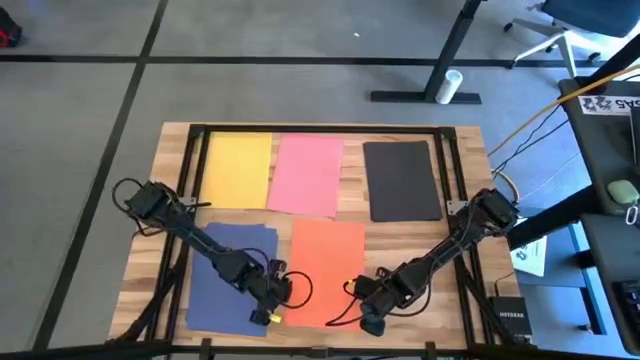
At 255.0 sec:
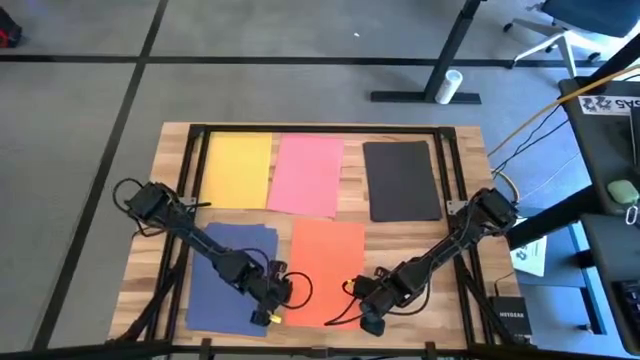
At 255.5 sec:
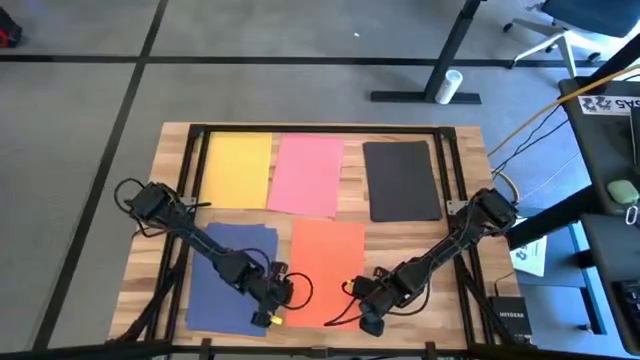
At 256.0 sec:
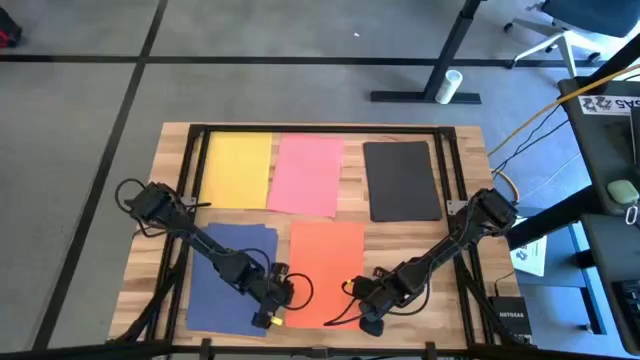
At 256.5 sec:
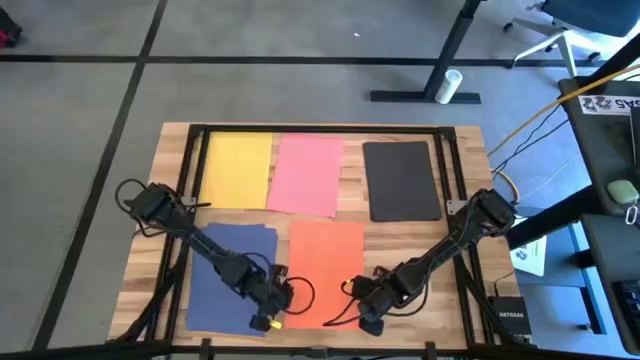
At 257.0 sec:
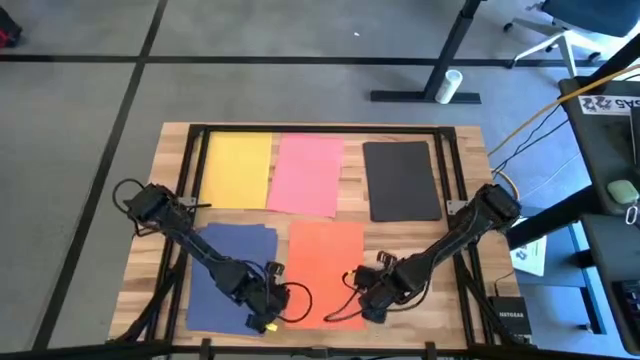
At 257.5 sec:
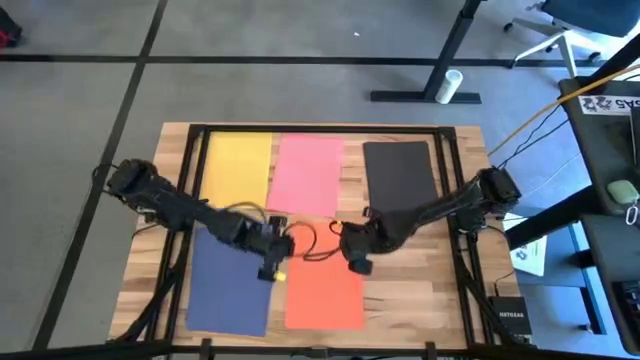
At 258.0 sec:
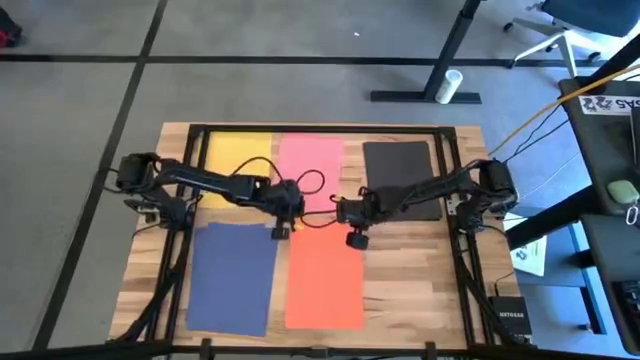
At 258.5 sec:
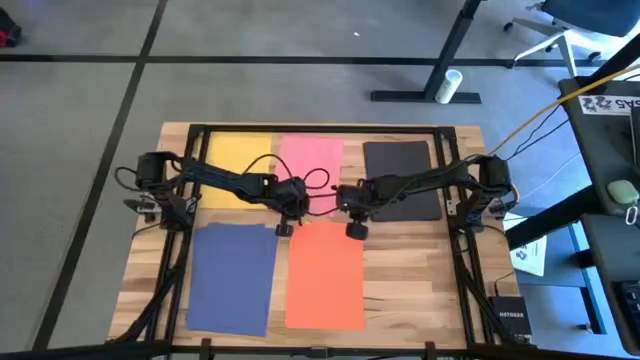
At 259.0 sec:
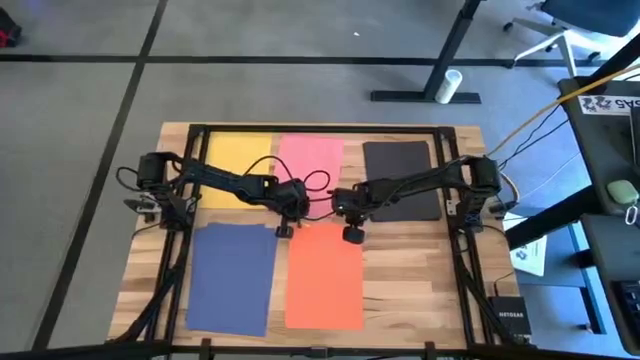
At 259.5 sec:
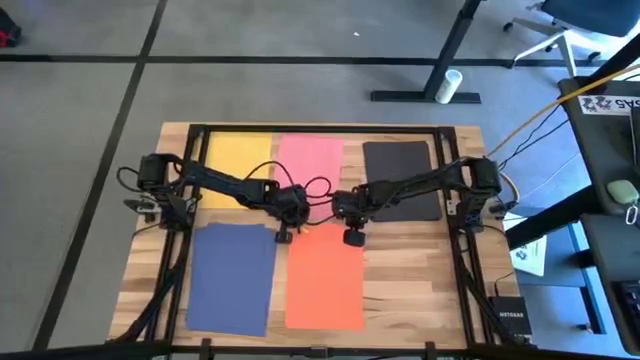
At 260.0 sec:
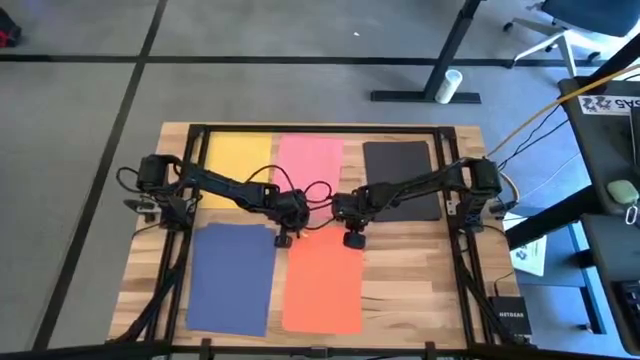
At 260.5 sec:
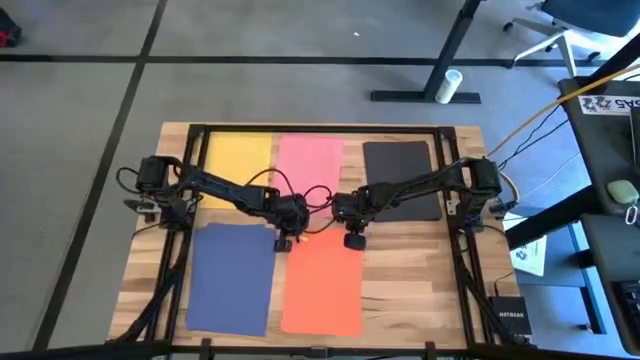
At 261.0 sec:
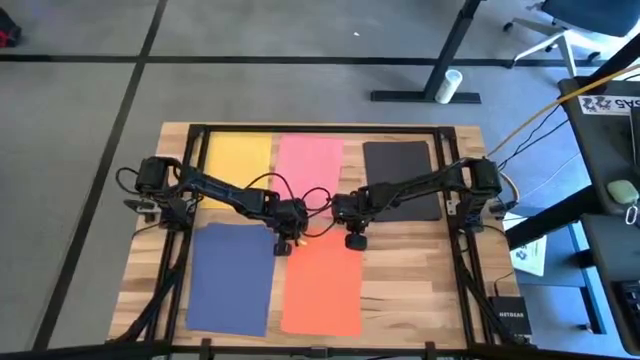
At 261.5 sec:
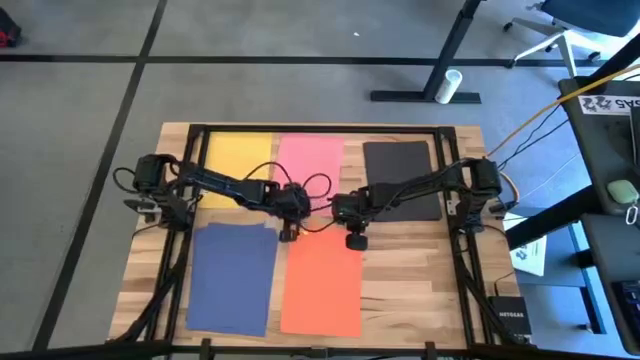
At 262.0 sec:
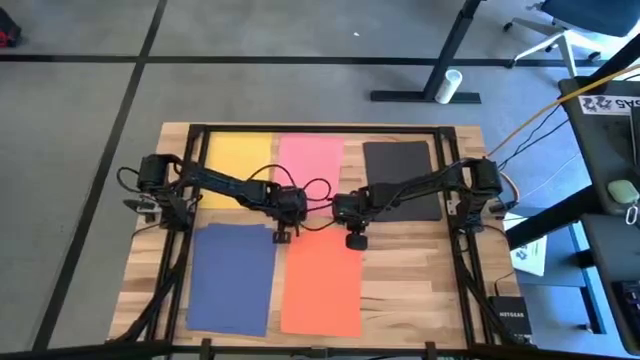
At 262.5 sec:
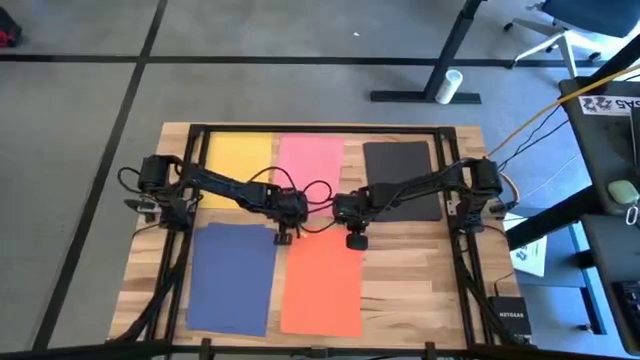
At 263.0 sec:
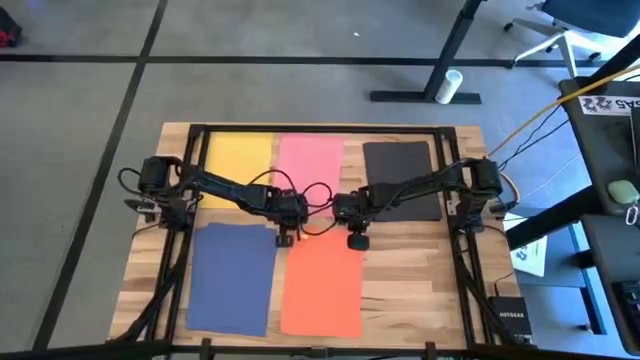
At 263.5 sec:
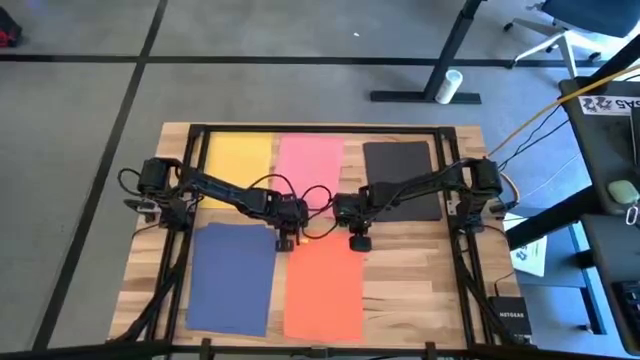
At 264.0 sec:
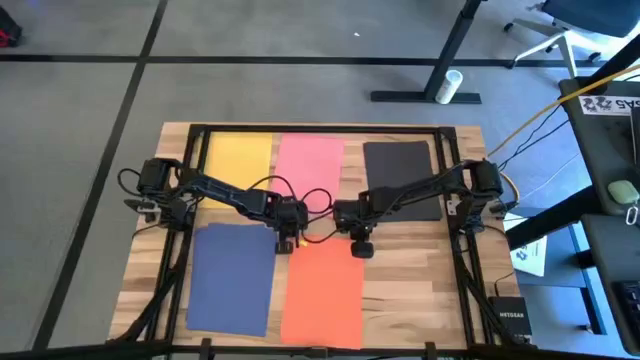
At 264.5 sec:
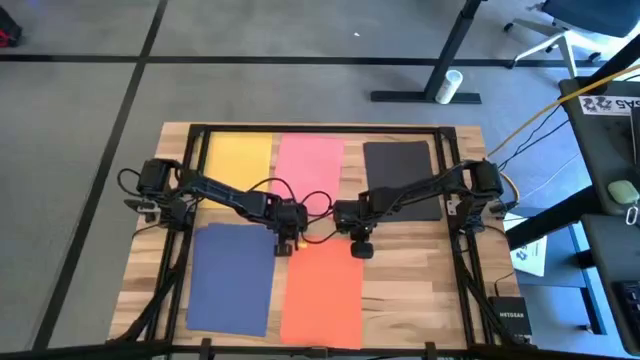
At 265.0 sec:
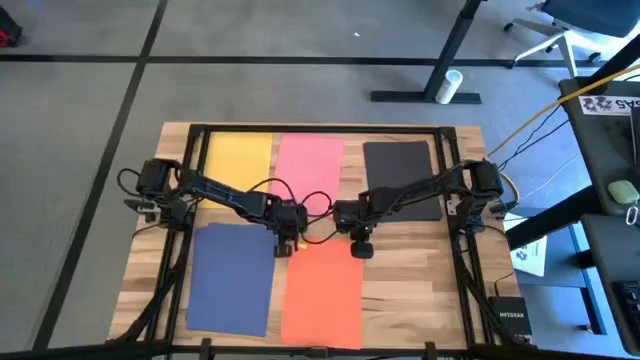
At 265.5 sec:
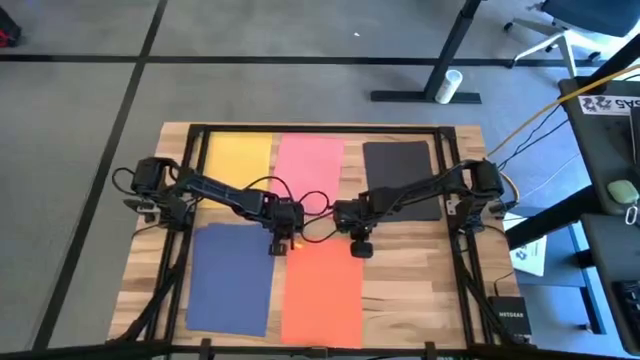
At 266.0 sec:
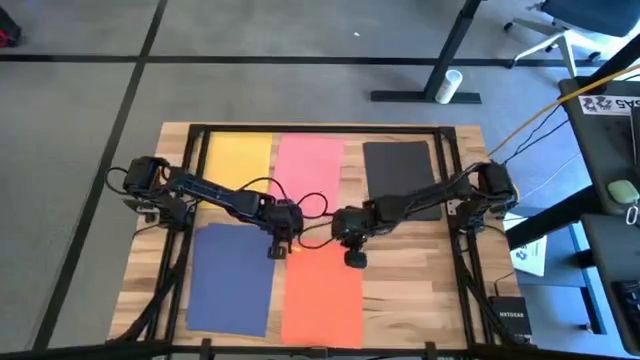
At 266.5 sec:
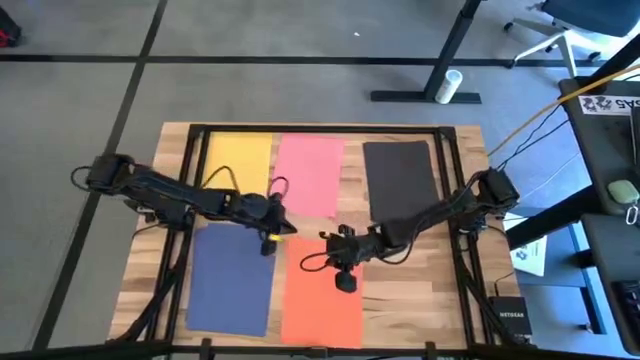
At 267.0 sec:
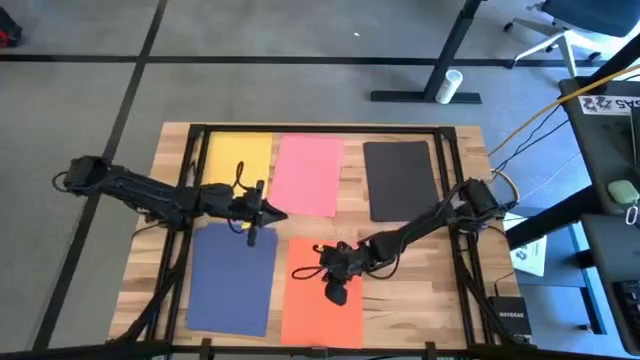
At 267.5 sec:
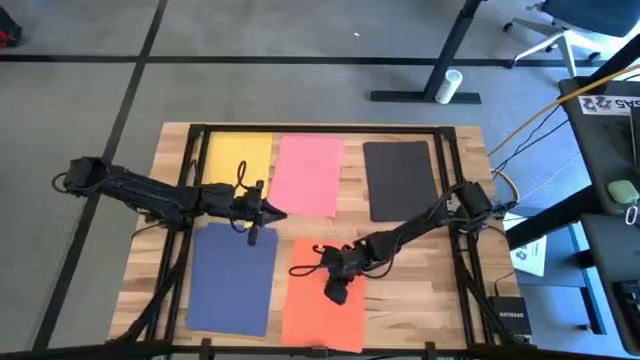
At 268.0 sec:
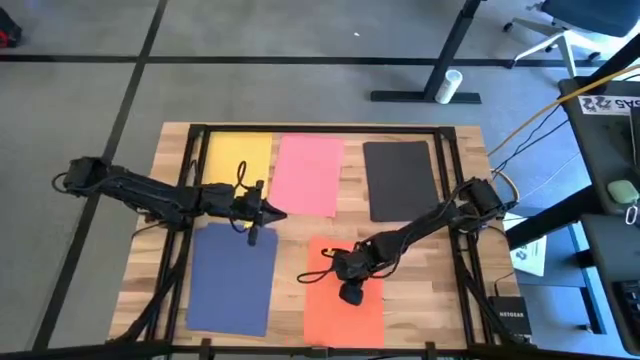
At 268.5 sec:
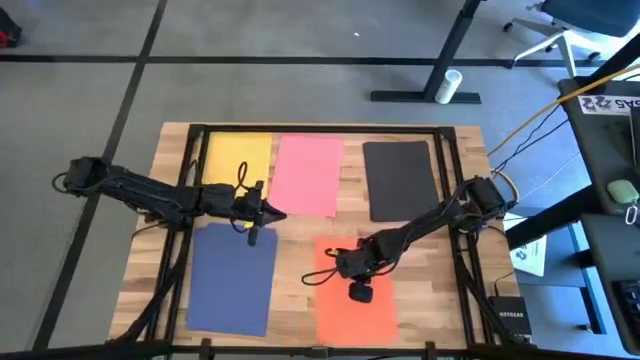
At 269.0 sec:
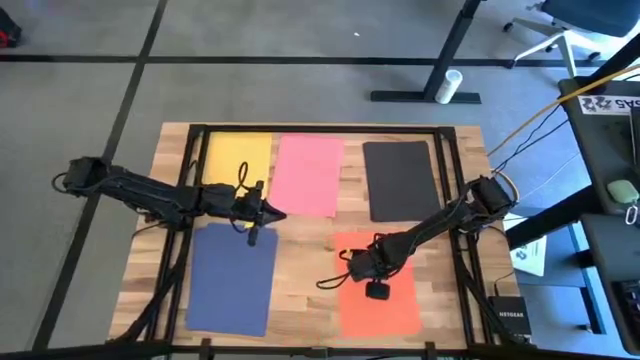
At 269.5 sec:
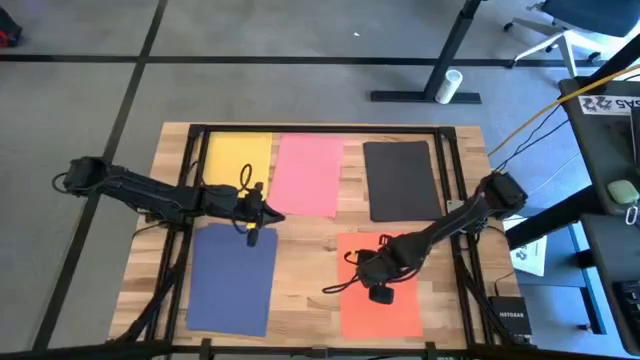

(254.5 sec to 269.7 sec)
Task: Organize paper
Adjust the stacked orange papers

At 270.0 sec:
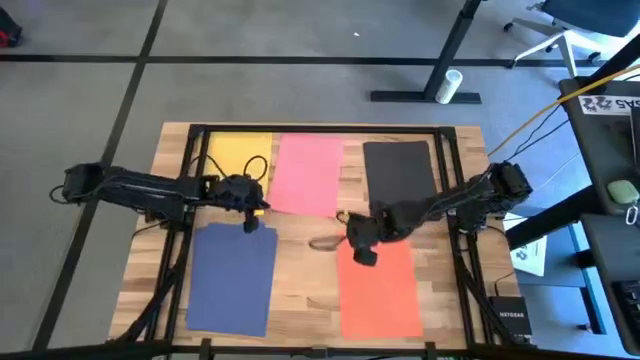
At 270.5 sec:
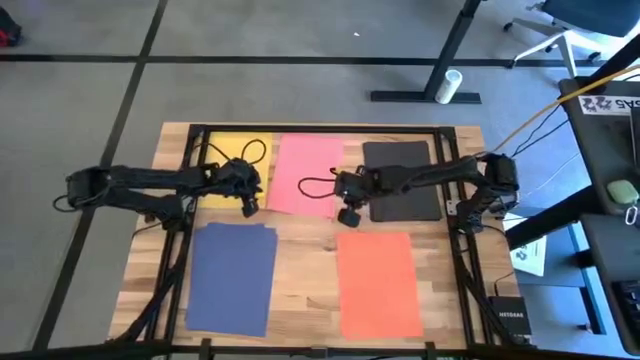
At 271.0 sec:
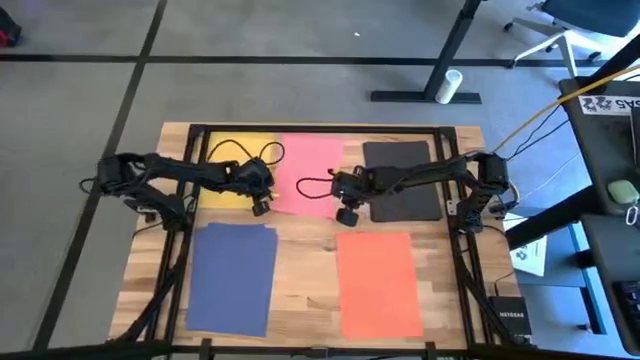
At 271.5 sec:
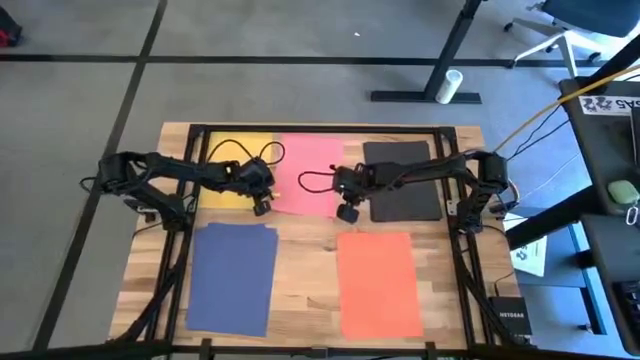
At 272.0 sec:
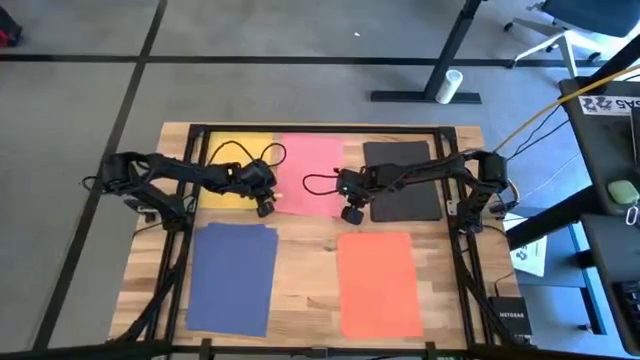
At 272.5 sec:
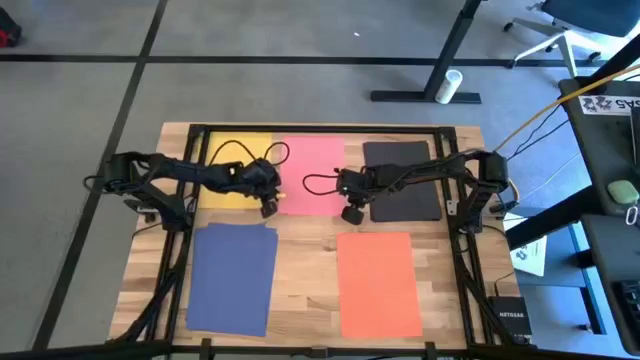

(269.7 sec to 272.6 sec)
Adjust the stacked pink papers
